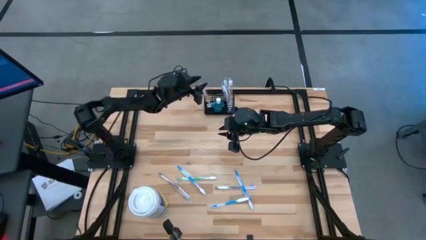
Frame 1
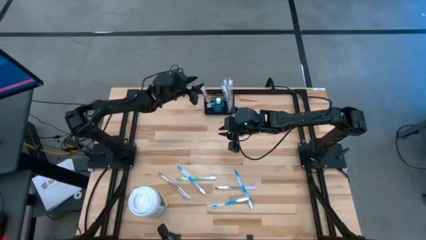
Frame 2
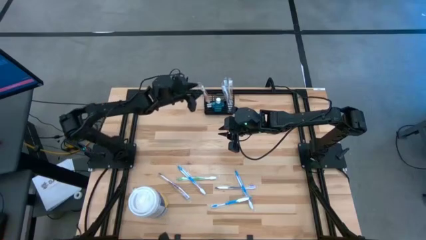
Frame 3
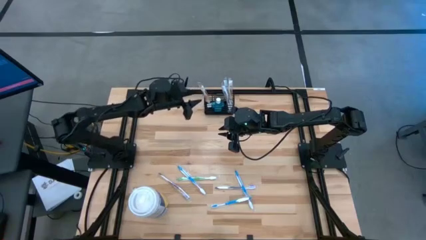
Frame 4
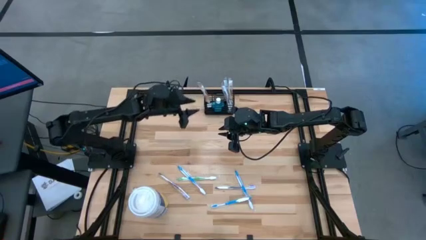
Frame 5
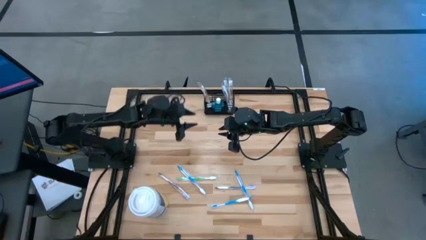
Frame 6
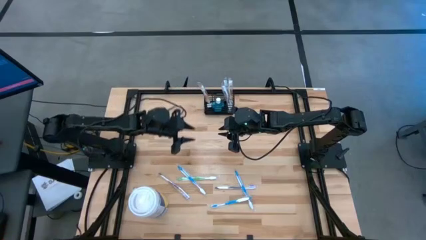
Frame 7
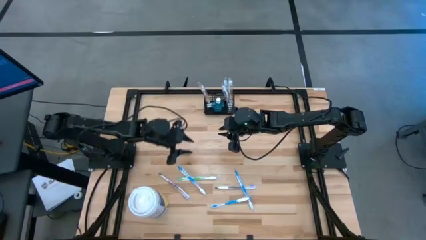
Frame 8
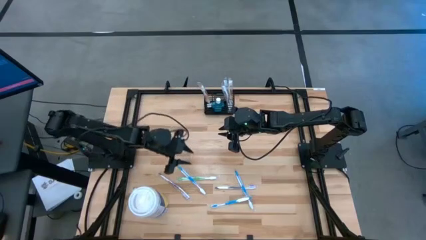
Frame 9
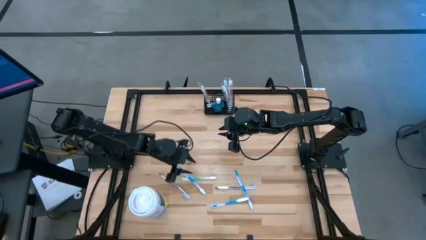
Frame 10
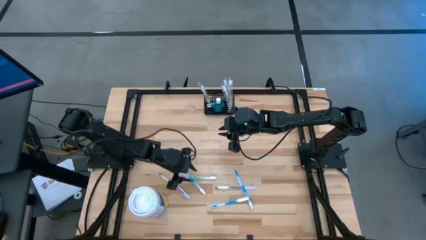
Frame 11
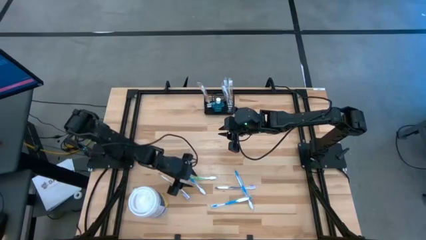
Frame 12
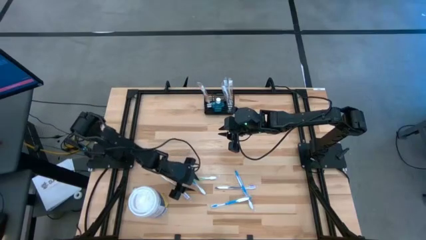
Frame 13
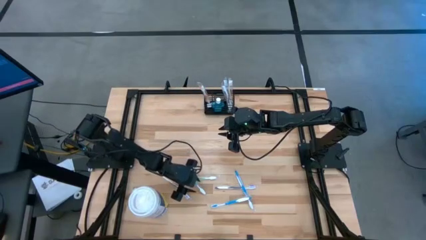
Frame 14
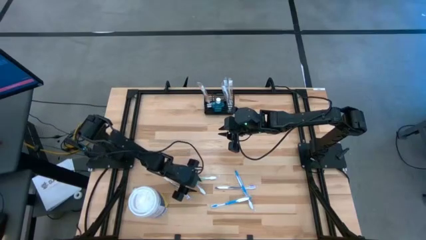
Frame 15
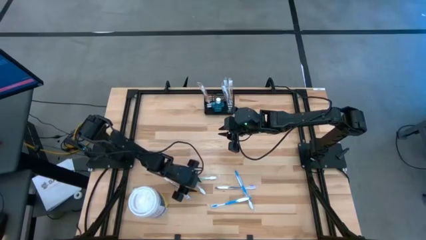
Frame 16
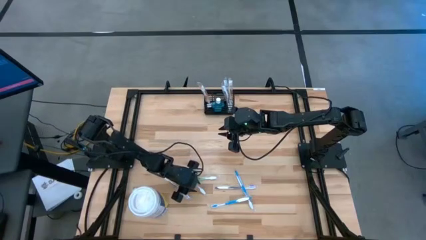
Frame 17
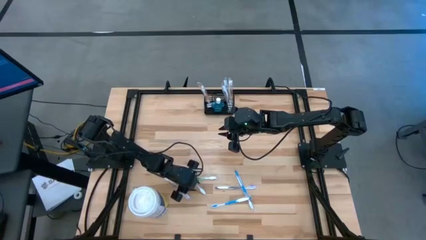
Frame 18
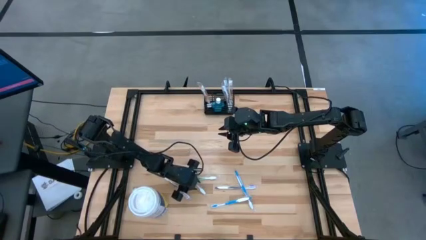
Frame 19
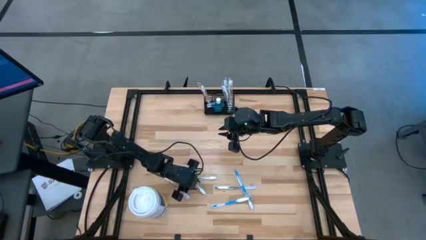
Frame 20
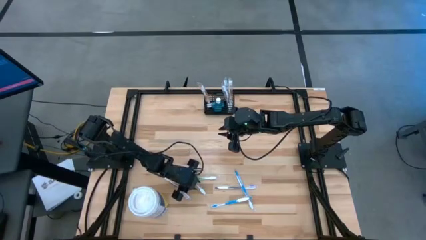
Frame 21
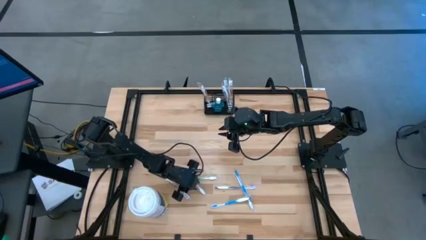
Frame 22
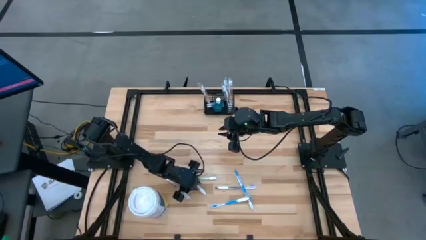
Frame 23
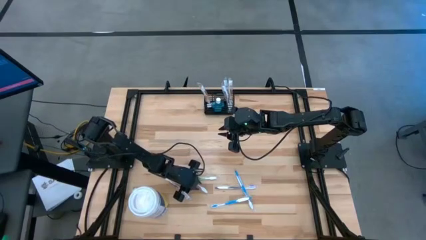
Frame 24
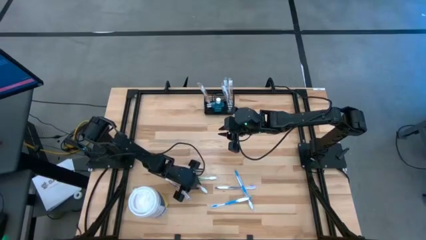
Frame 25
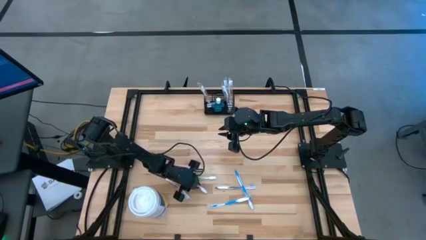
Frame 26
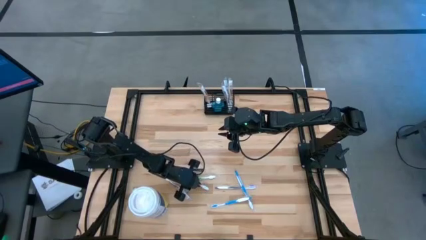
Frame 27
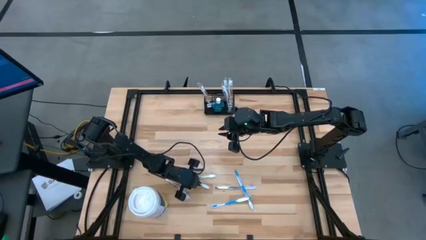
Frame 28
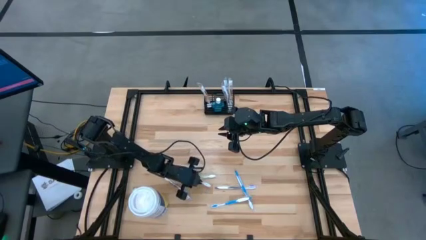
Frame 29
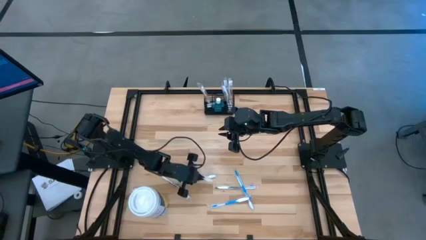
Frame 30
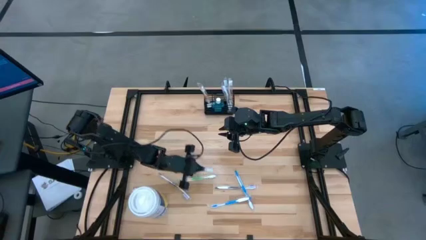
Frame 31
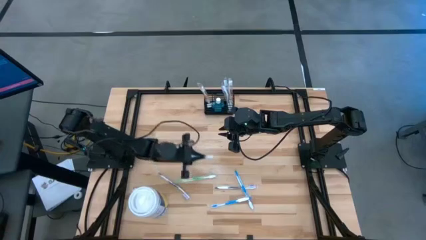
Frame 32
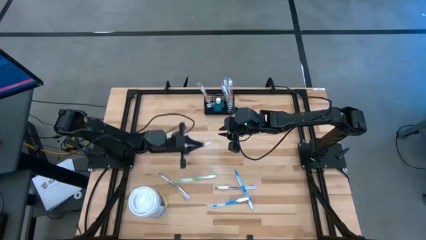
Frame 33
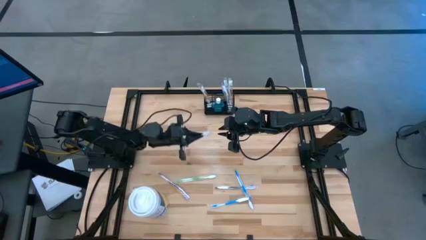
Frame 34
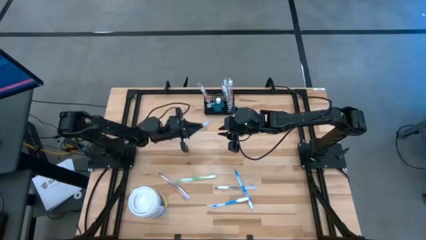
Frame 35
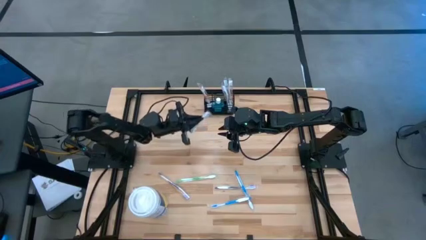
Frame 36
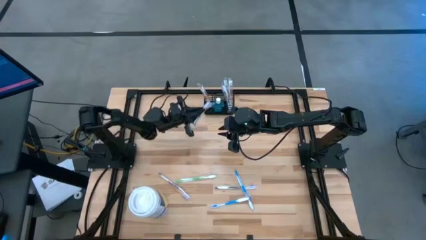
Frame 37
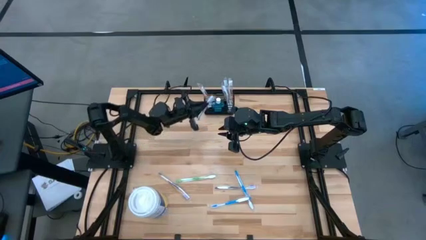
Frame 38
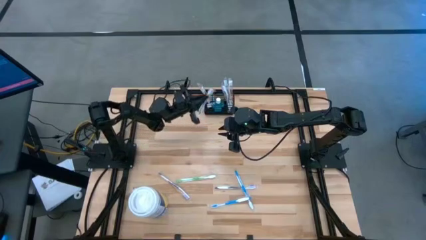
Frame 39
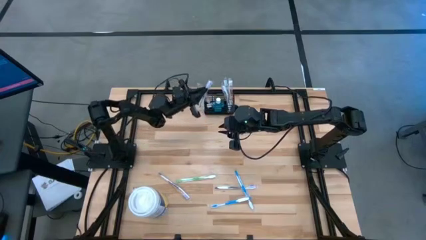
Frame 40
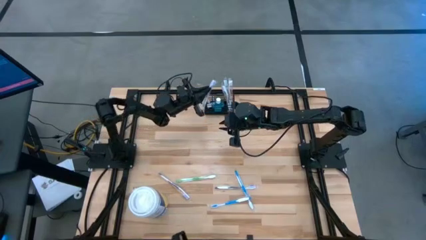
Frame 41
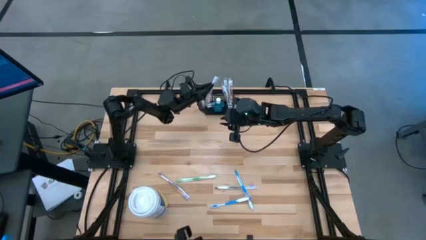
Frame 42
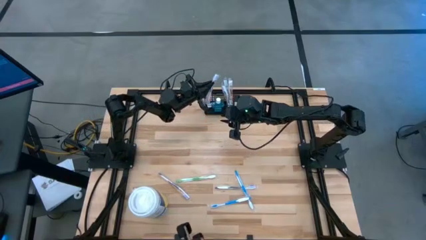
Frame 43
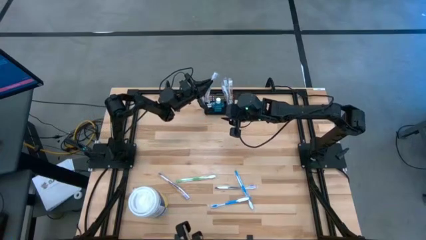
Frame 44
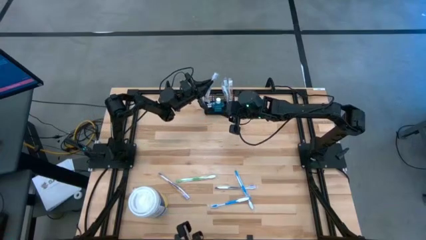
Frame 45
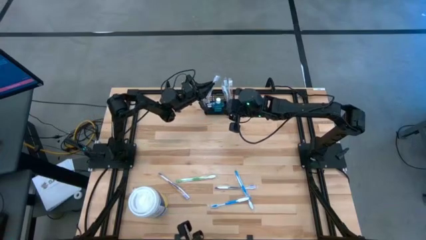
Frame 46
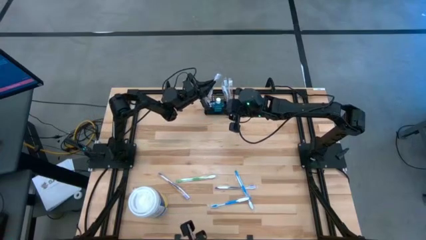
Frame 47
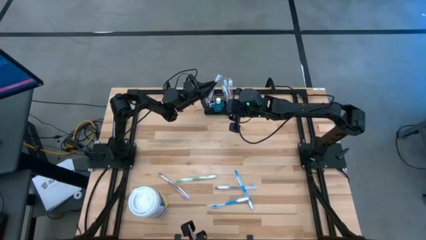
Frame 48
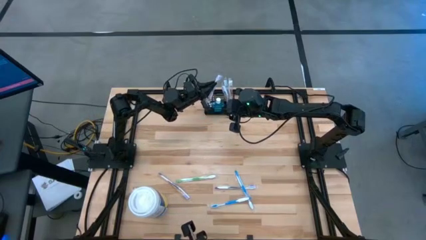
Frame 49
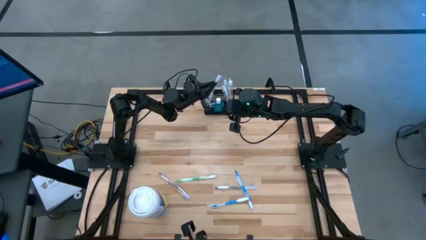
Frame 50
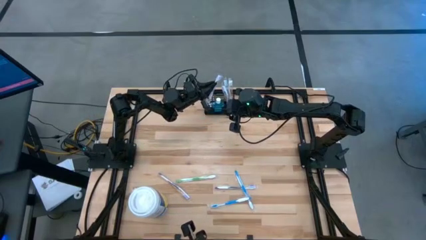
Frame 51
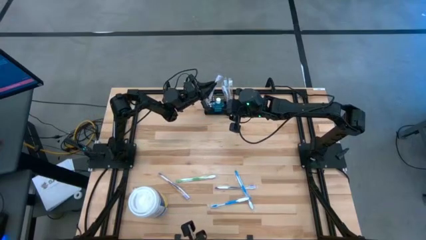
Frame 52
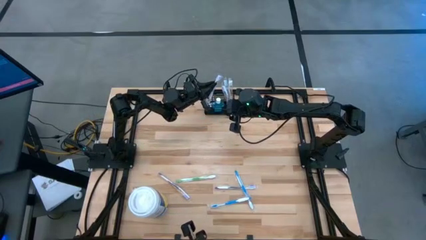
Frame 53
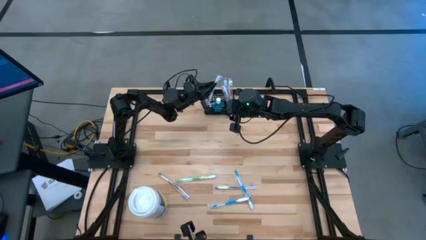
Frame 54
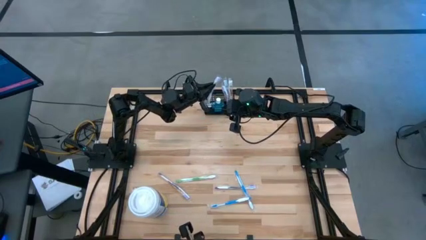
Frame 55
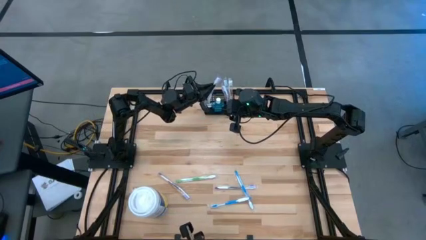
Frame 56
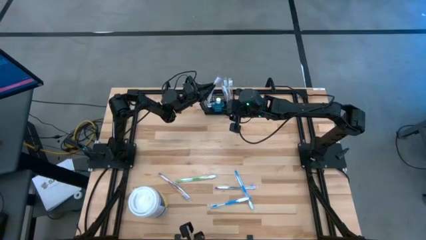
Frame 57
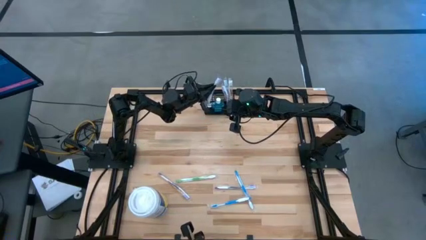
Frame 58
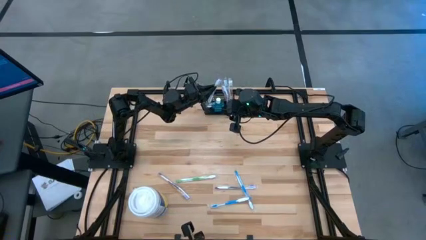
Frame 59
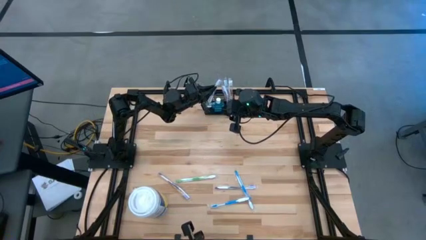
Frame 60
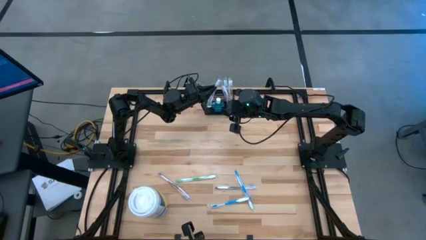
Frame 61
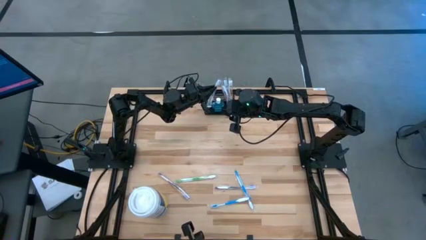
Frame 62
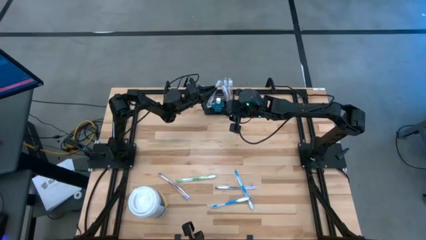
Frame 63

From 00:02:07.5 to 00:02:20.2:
Task: Pick & Place toothbrushing station
Put the blue toothbrush into the mesh organizer

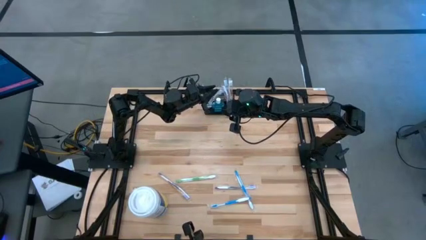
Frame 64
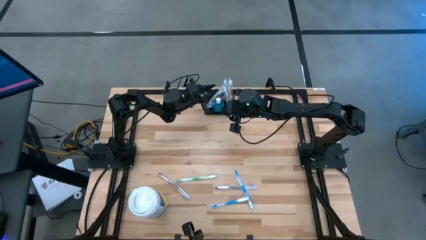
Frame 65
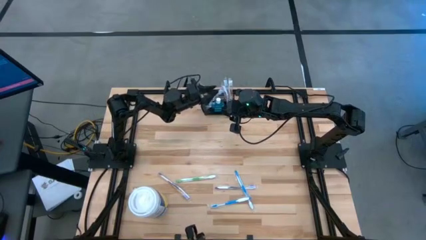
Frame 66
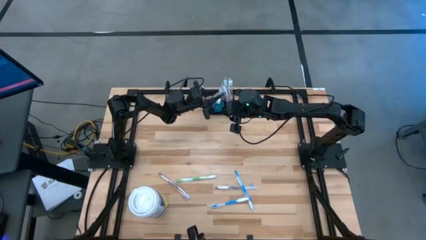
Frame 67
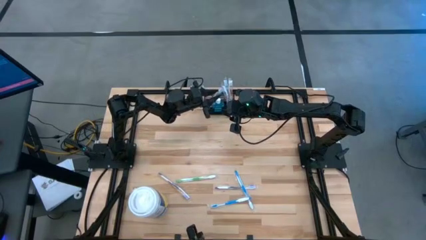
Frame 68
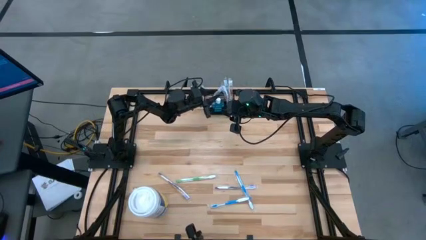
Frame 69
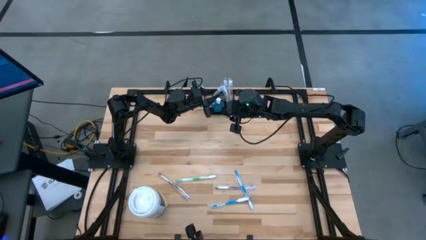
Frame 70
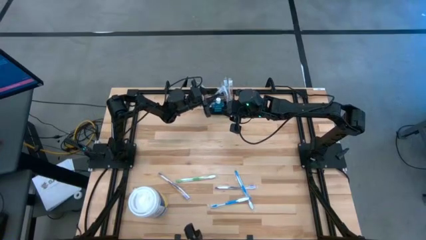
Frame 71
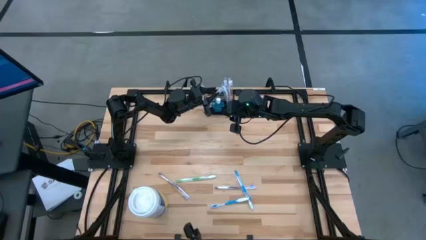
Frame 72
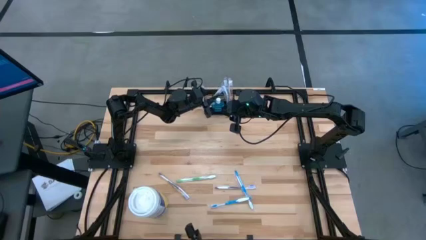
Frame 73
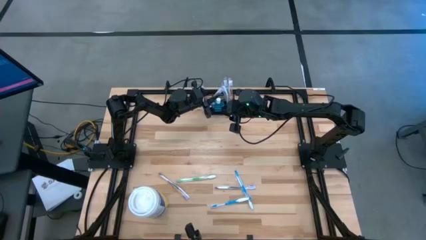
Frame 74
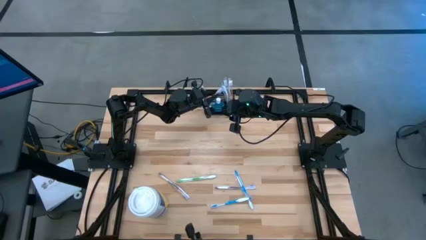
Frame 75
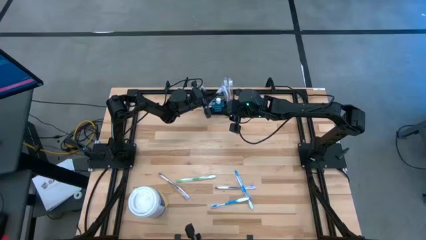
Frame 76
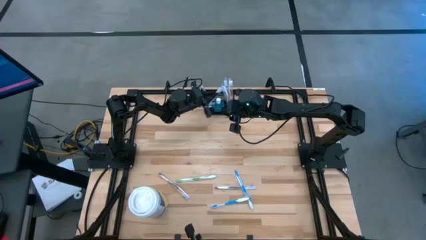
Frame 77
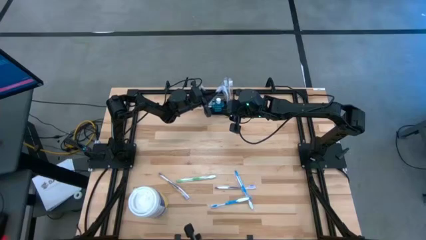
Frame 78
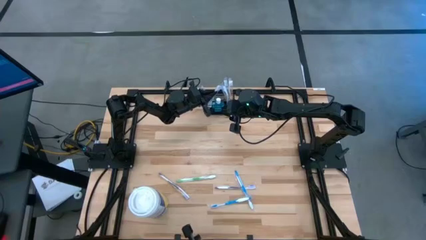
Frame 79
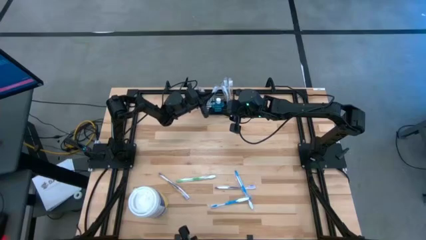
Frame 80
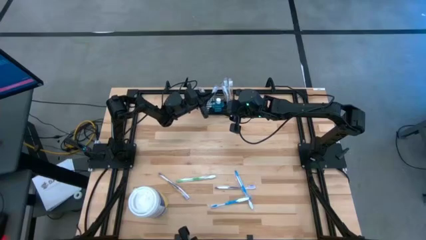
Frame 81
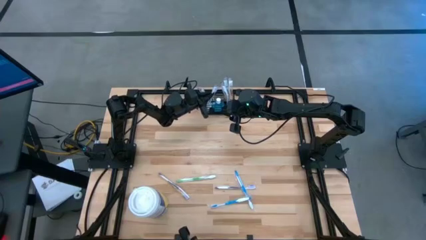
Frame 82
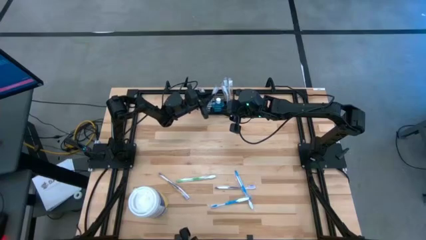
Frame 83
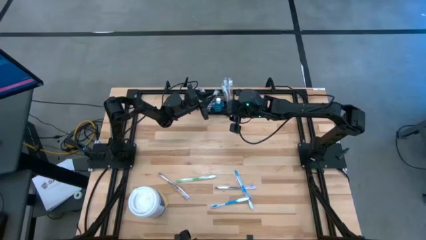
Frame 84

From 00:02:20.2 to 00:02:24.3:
Adjust the blue toothbrush in the mesh organizer
